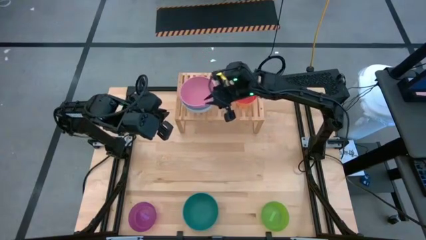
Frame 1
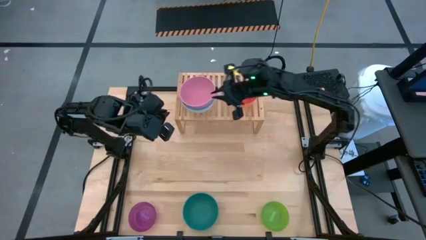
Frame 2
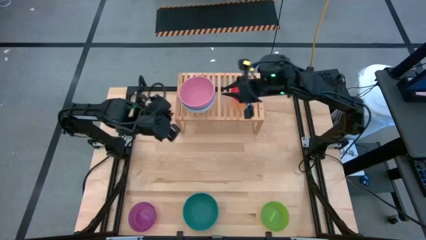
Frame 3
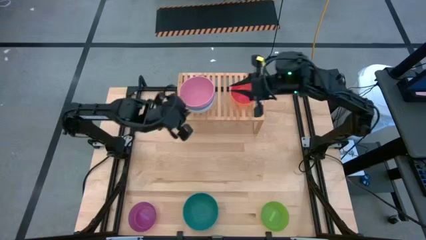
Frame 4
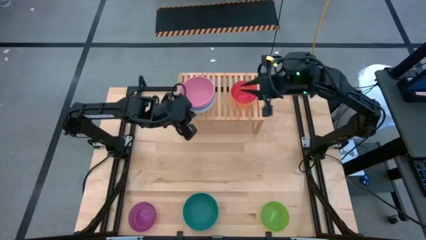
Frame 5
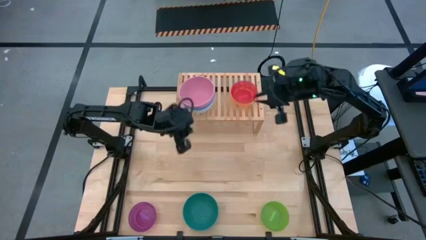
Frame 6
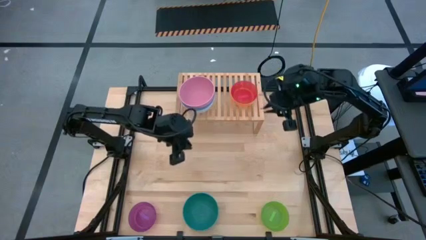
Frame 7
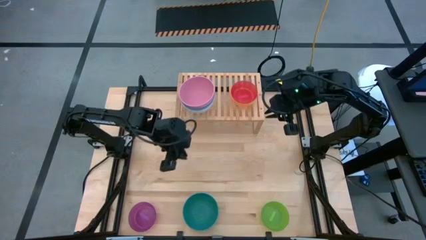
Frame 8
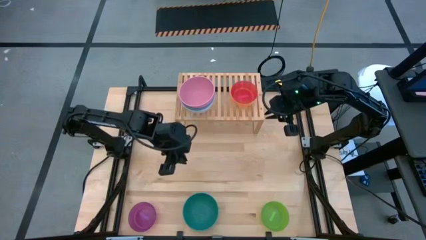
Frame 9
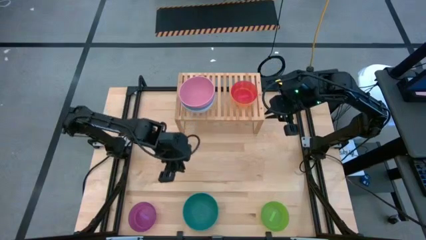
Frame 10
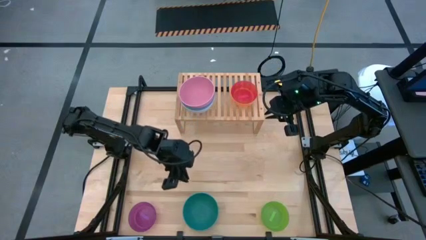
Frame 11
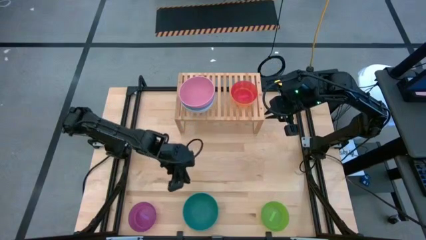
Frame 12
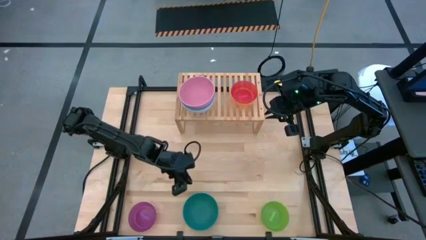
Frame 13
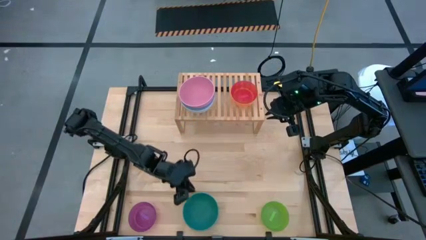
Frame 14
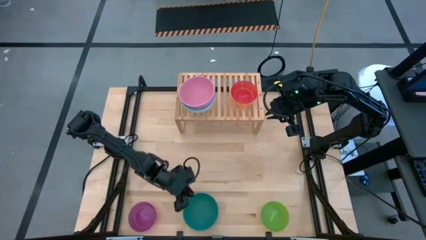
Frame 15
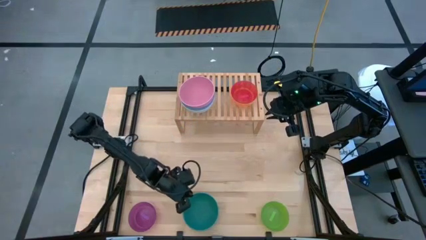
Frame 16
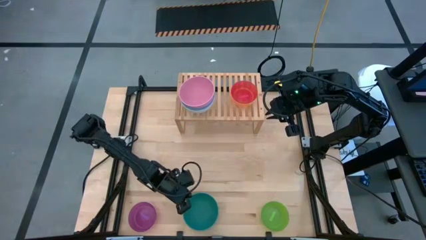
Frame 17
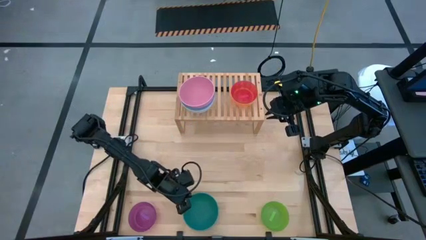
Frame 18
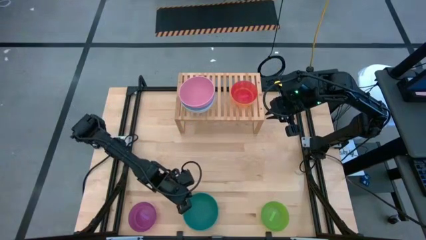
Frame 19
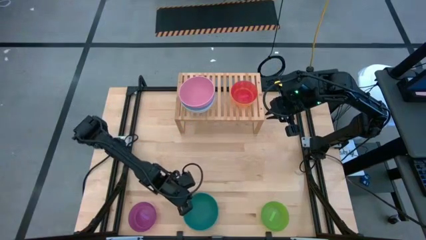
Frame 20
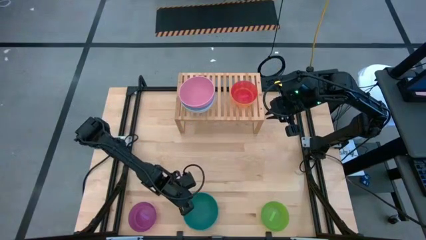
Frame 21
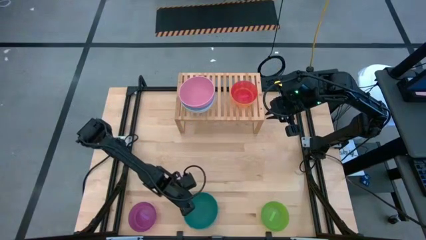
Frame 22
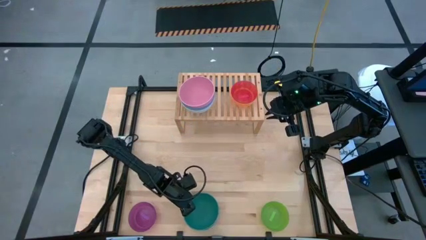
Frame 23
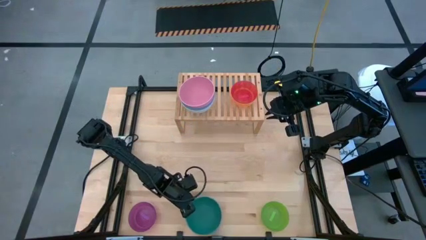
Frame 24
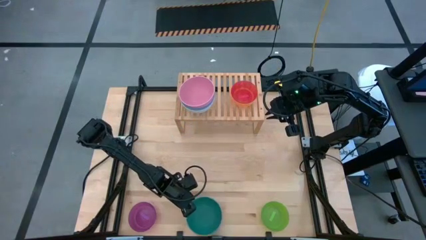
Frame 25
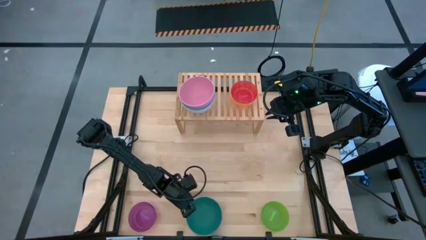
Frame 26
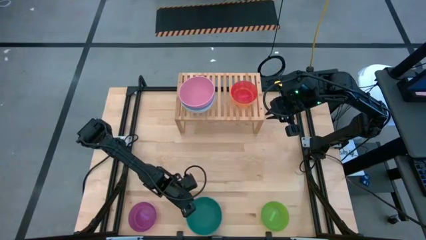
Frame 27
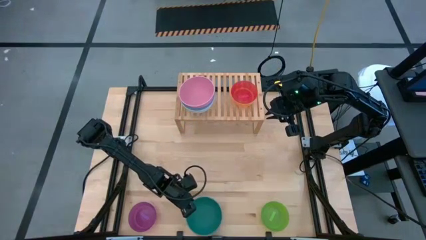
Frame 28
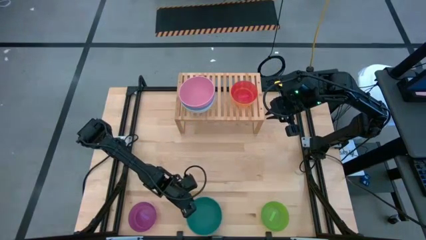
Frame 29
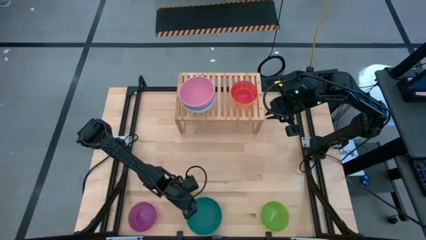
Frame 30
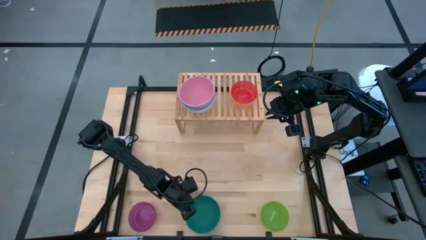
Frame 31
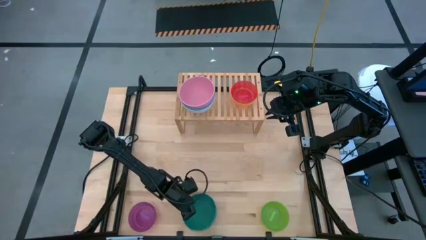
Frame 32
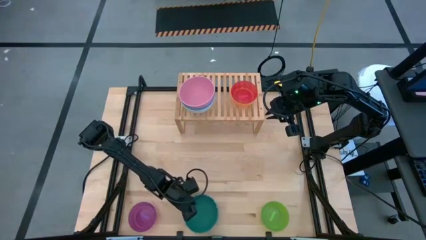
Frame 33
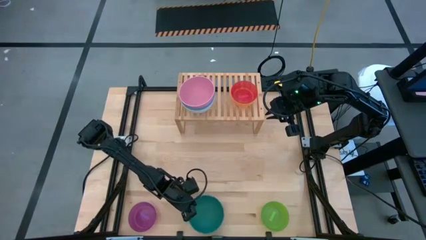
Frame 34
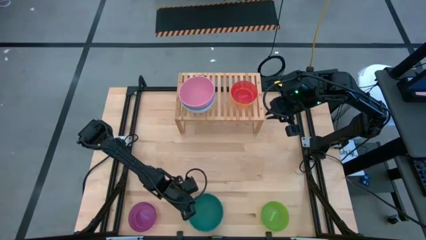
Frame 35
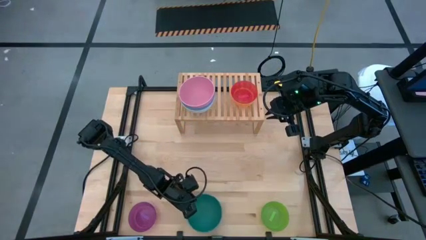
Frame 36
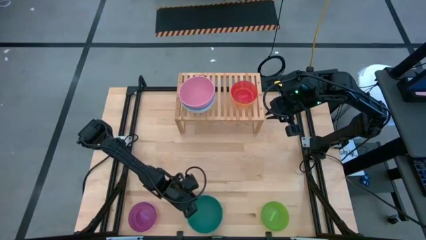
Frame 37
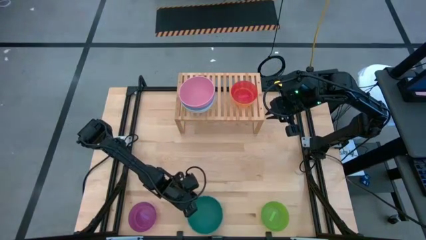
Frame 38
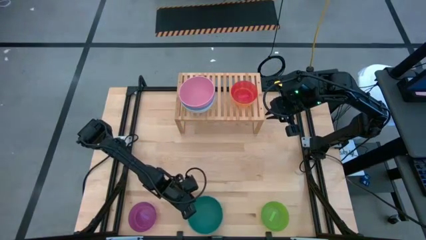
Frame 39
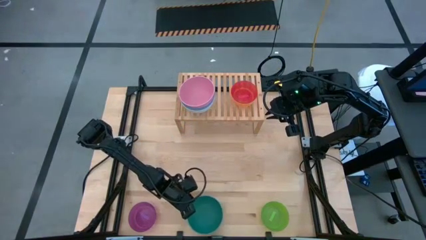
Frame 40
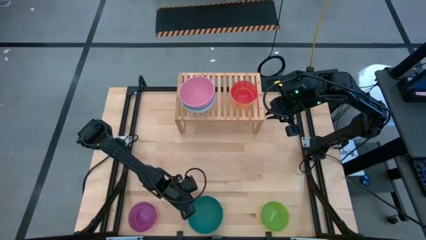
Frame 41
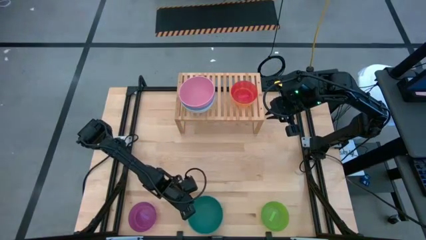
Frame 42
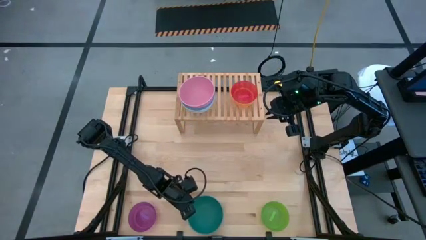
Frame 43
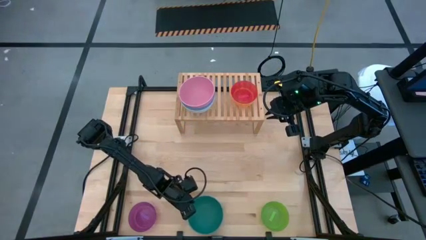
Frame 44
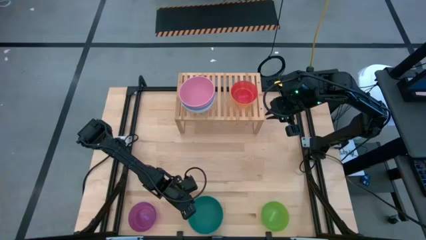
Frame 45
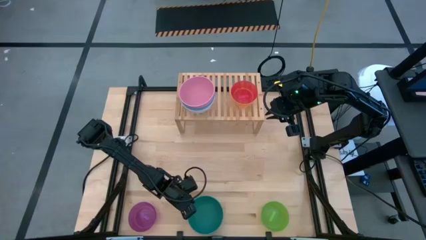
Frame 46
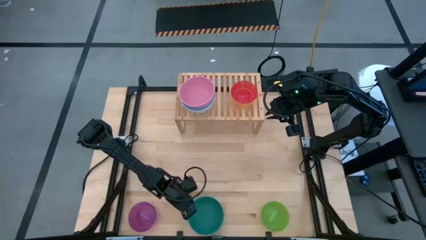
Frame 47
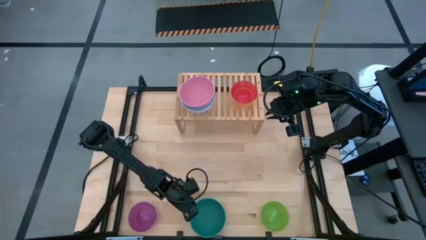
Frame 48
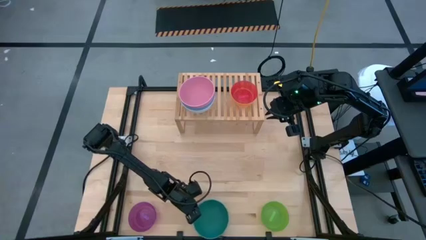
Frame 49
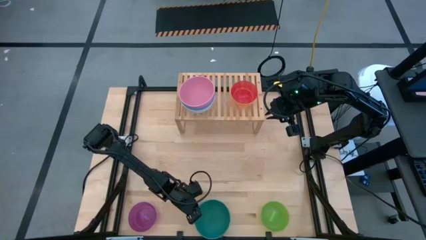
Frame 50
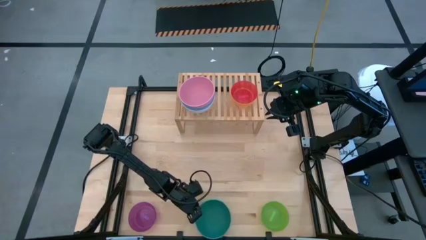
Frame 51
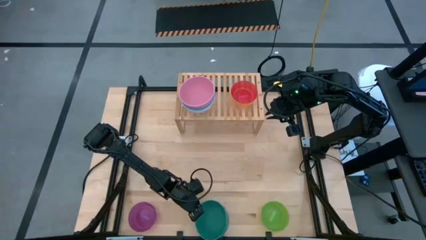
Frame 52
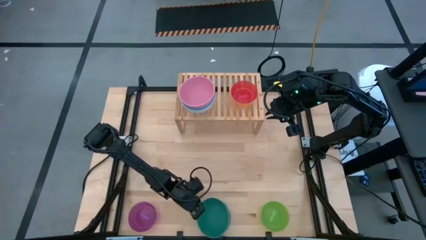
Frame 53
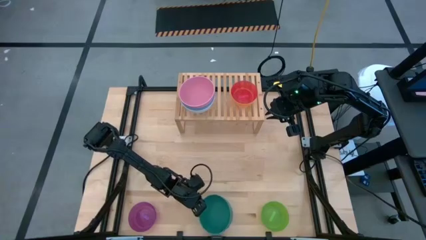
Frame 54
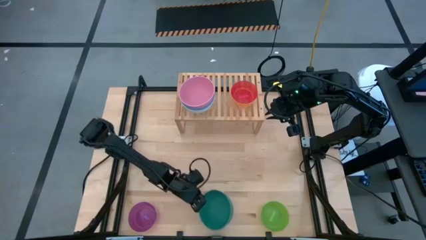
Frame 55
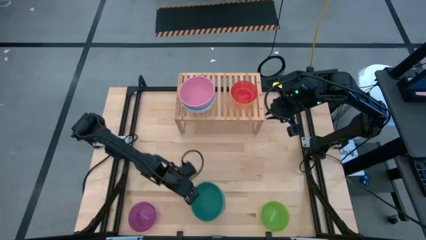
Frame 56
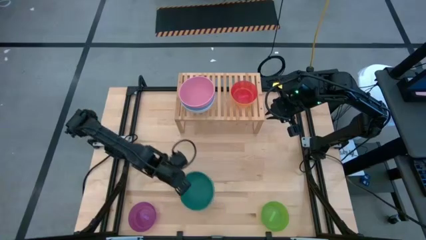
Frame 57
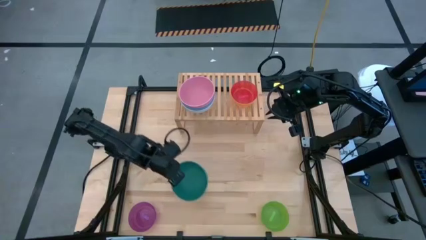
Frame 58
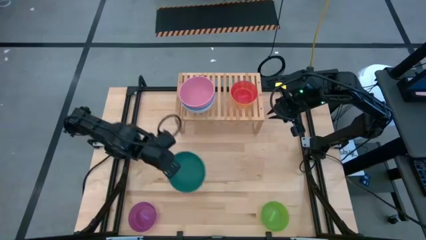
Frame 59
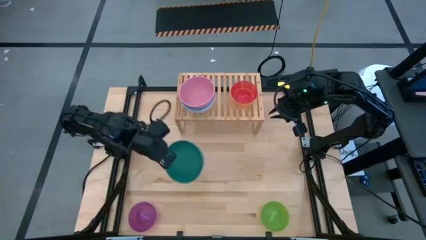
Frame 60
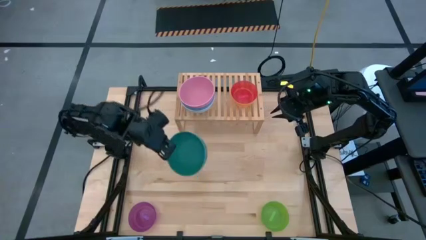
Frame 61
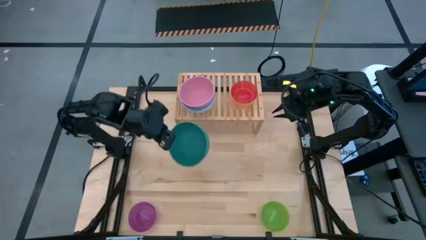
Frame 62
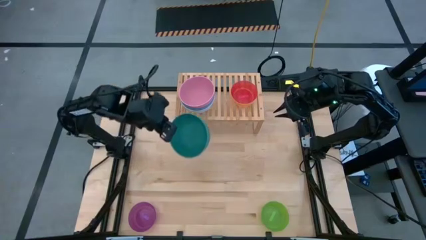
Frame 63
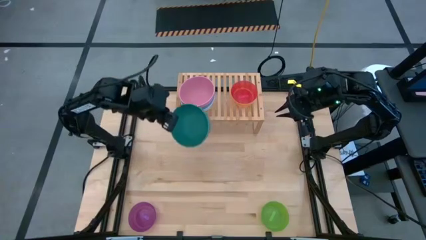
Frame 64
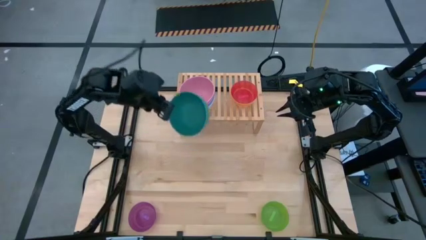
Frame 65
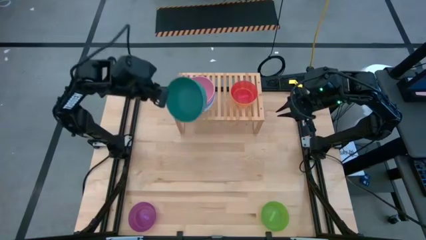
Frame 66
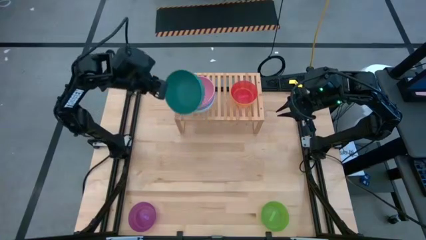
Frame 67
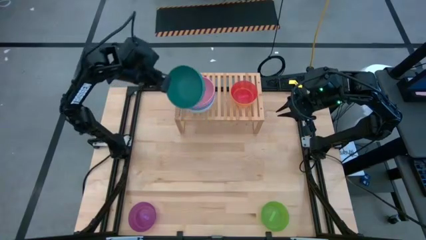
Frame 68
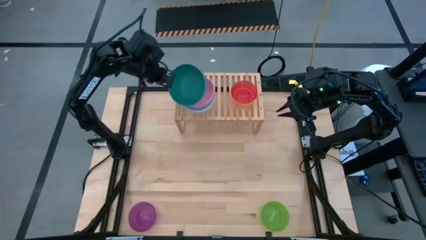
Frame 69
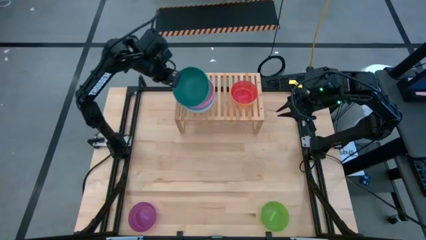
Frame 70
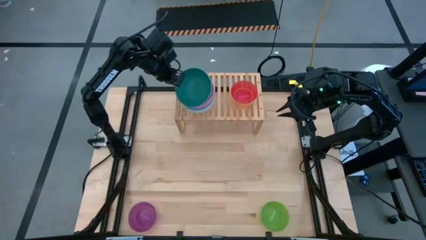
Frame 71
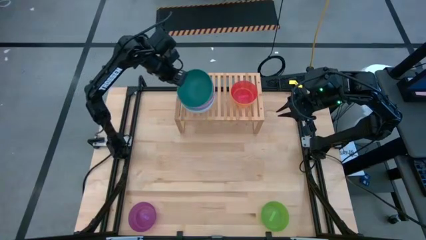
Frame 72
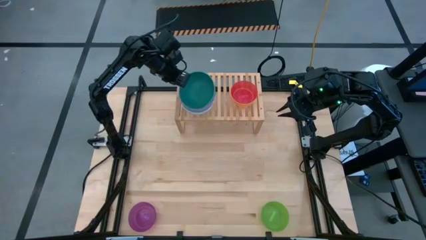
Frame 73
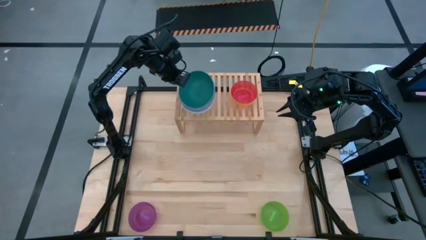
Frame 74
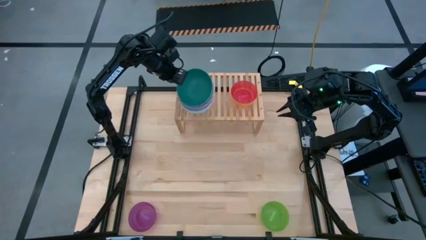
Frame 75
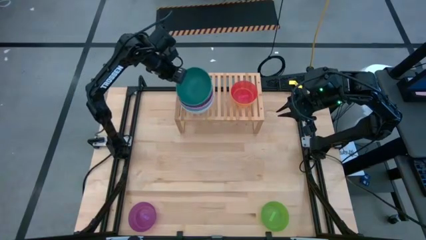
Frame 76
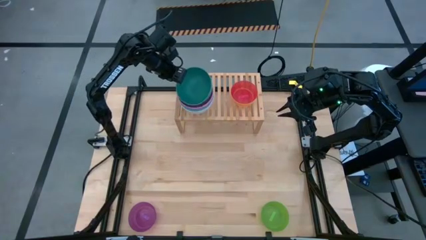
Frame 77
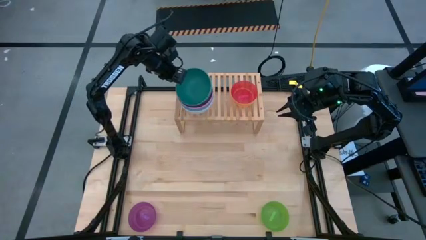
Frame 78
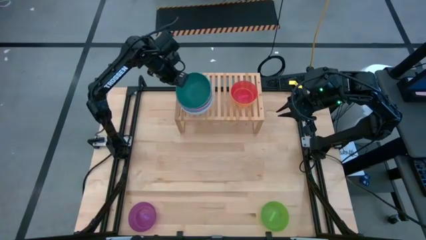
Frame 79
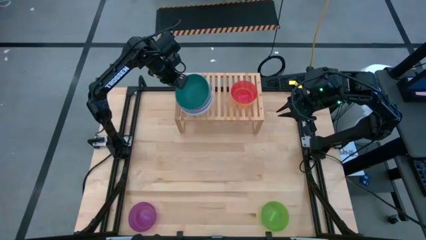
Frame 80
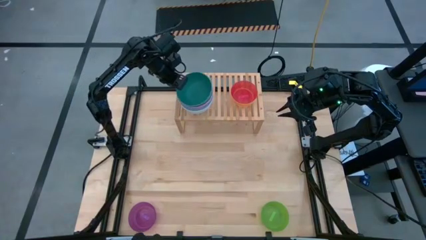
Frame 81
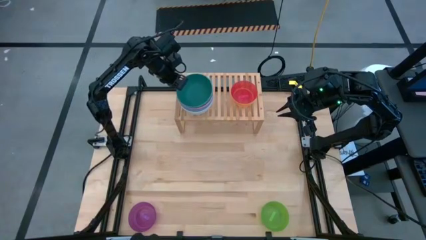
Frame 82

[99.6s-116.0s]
Task: Place and stack bowls onto a shelf
Stack the green bowl on top of the pink bowl on the shelf

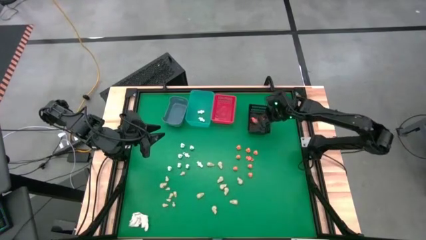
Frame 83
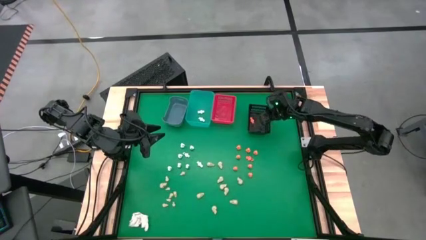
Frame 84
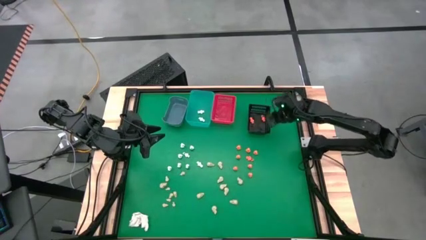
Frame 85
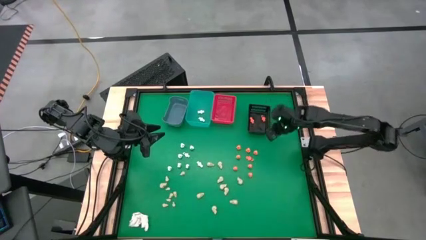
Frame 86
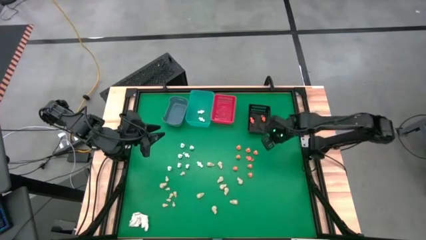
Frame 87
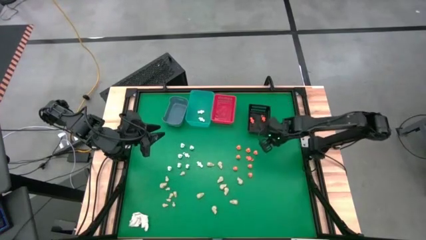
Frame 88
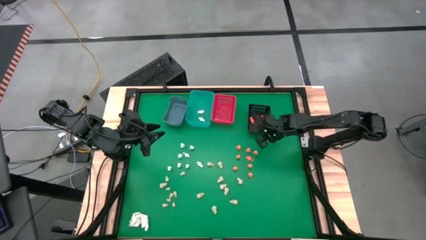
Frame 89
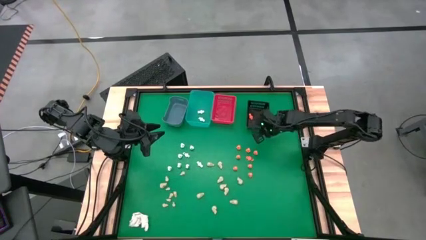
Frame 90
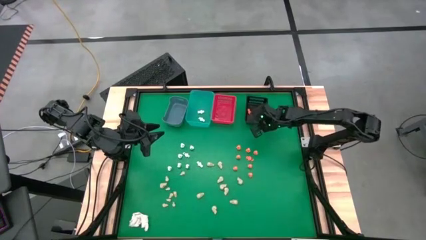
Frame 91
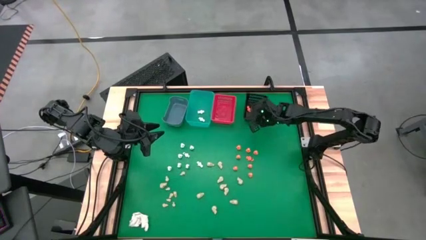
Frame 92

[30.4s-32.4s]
Task: Sort Halloween decoration
Adjust the black bin on the table
